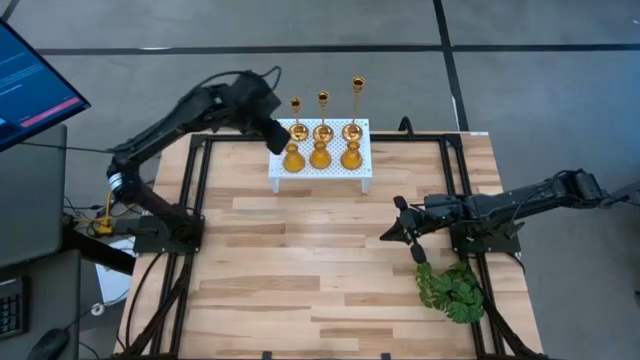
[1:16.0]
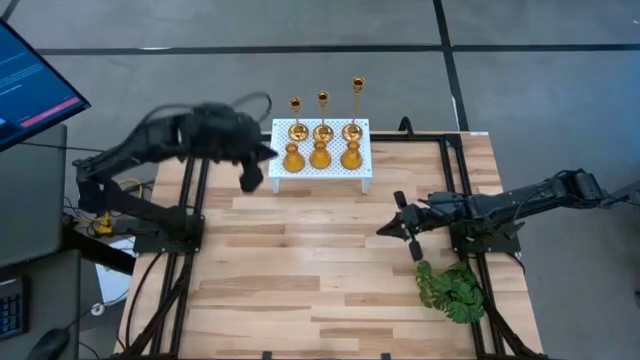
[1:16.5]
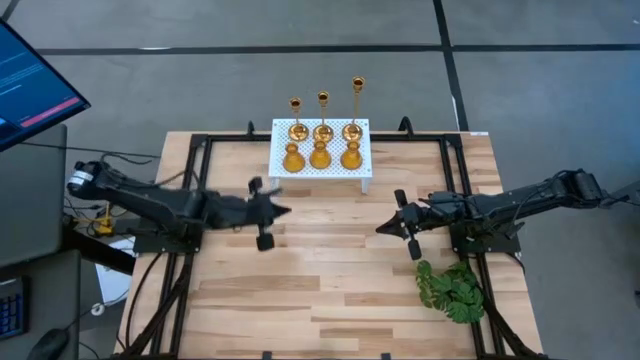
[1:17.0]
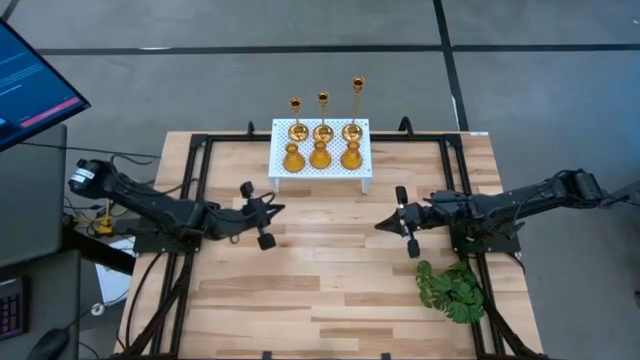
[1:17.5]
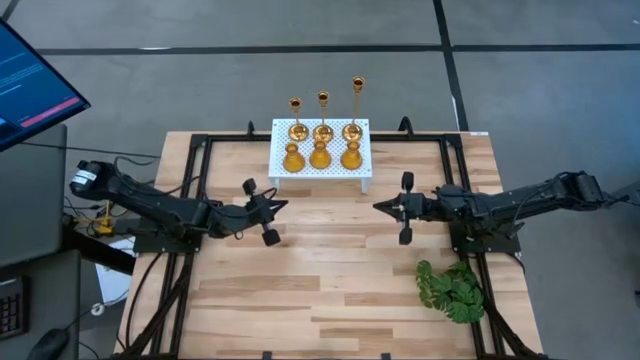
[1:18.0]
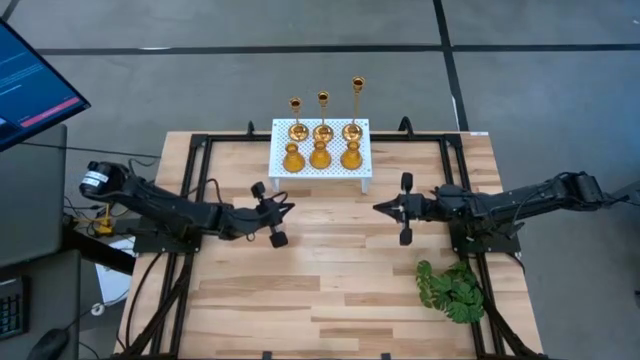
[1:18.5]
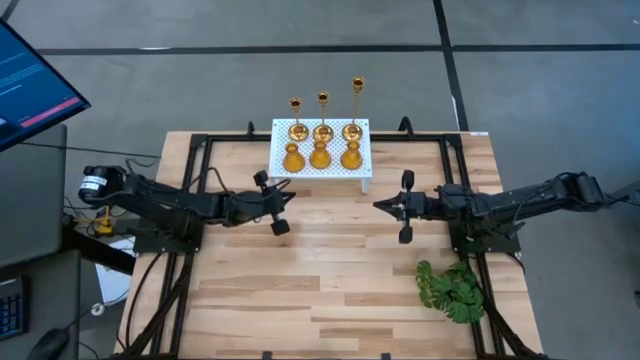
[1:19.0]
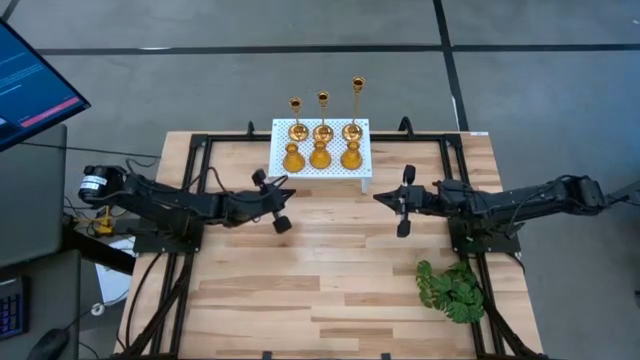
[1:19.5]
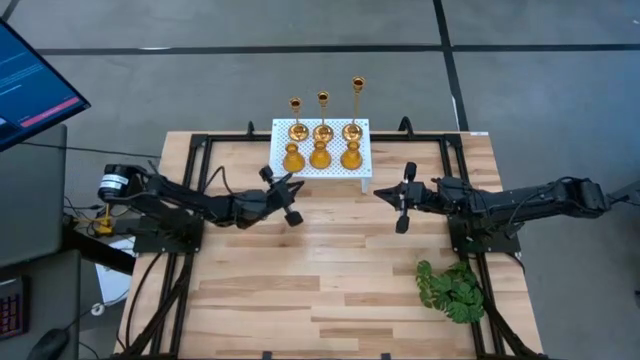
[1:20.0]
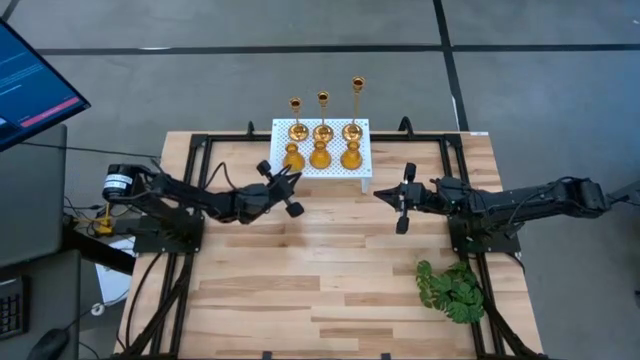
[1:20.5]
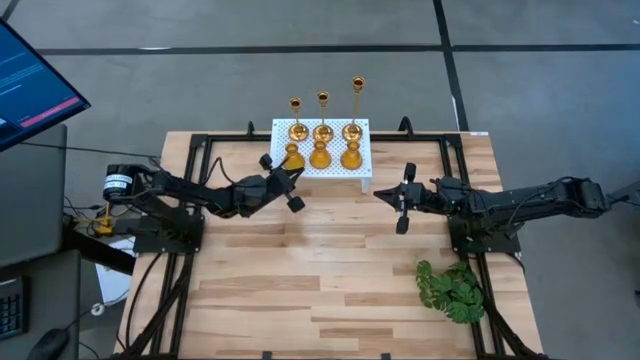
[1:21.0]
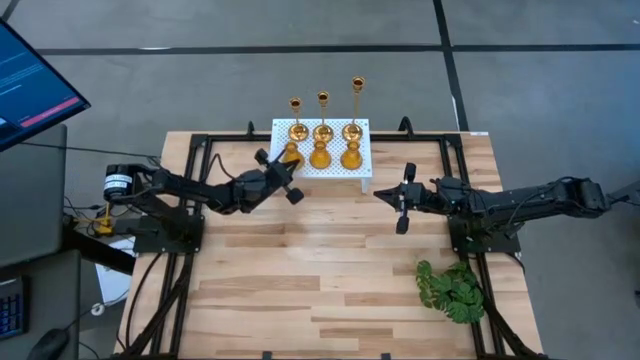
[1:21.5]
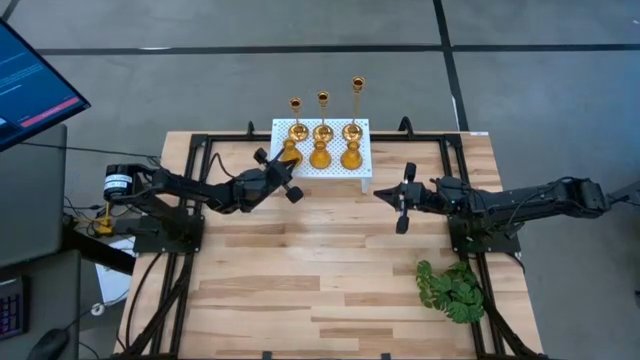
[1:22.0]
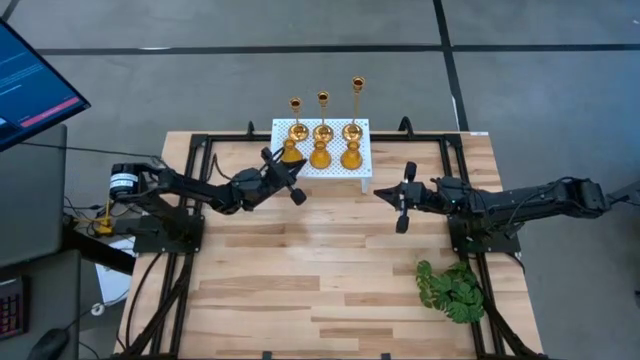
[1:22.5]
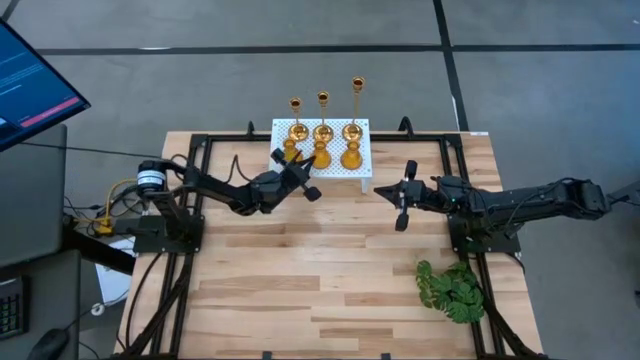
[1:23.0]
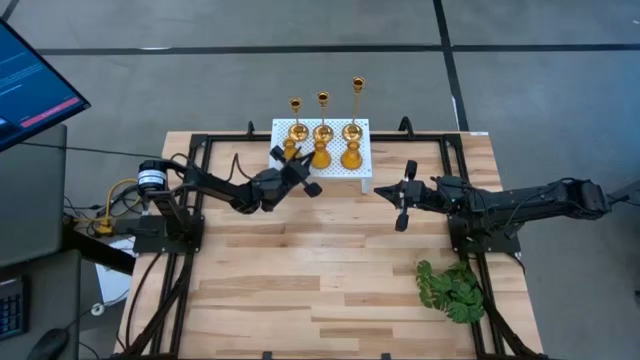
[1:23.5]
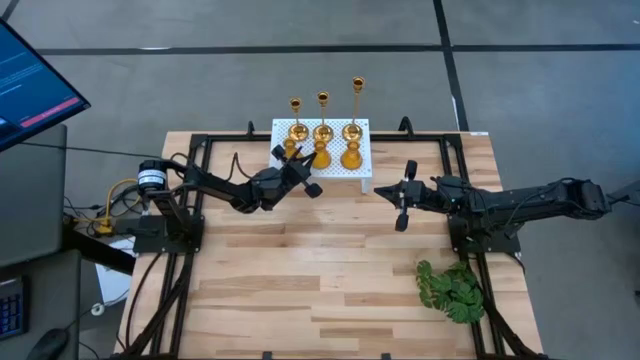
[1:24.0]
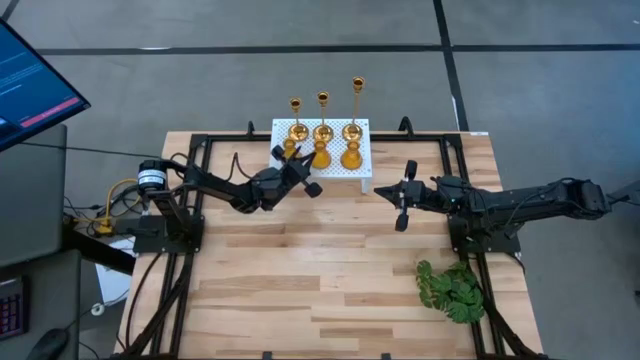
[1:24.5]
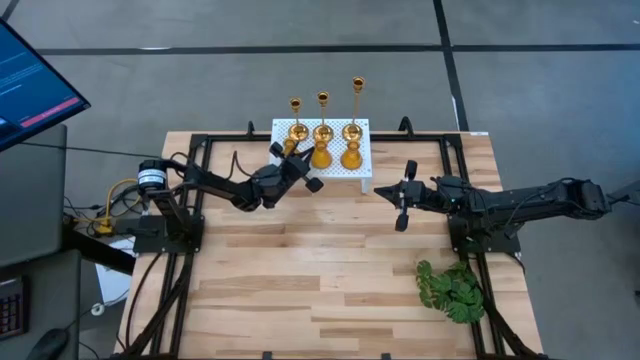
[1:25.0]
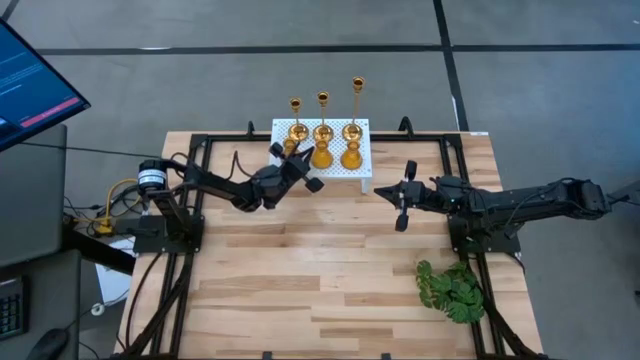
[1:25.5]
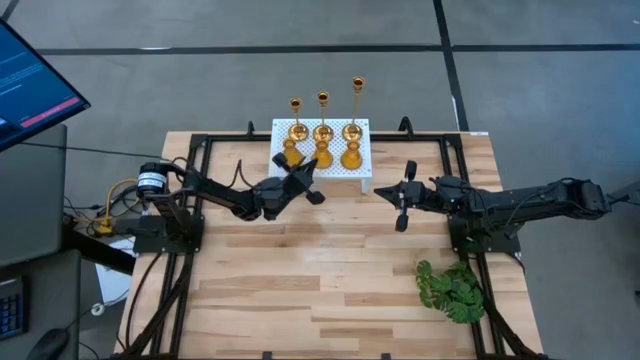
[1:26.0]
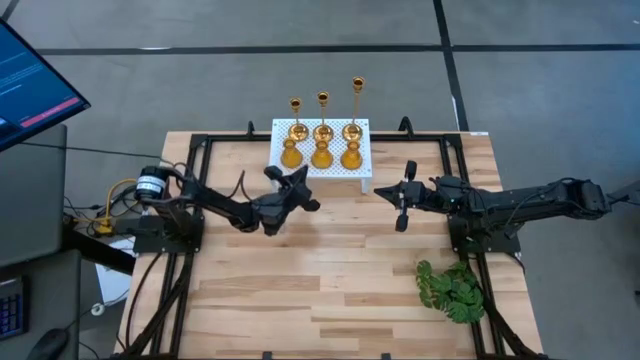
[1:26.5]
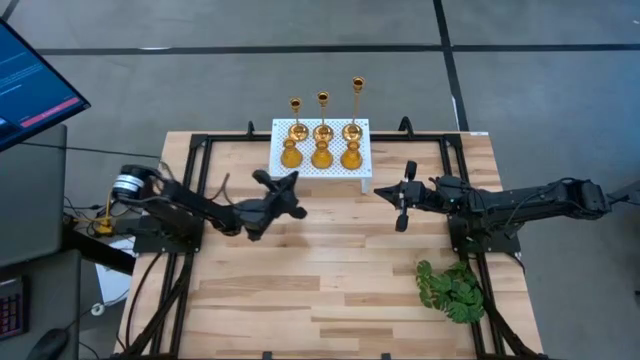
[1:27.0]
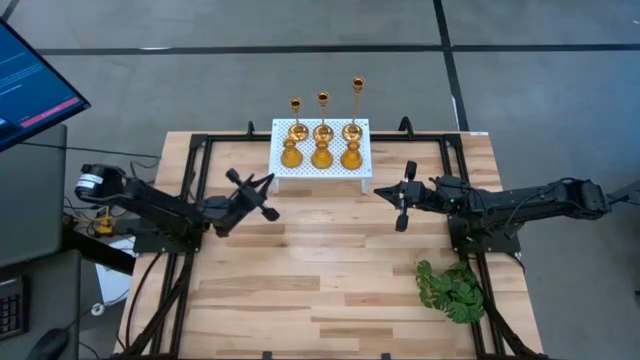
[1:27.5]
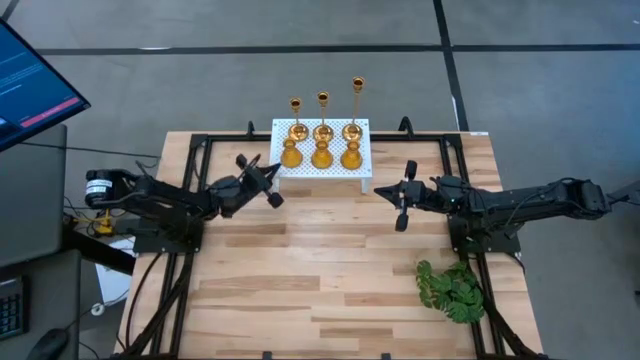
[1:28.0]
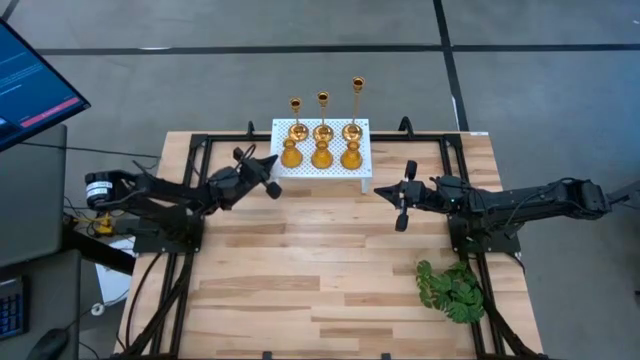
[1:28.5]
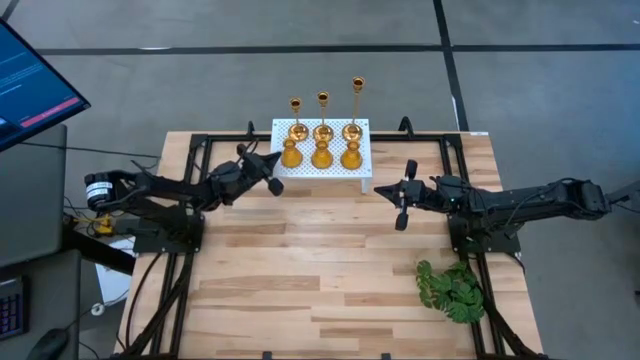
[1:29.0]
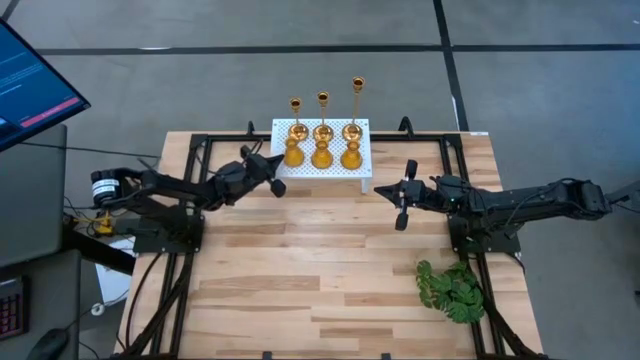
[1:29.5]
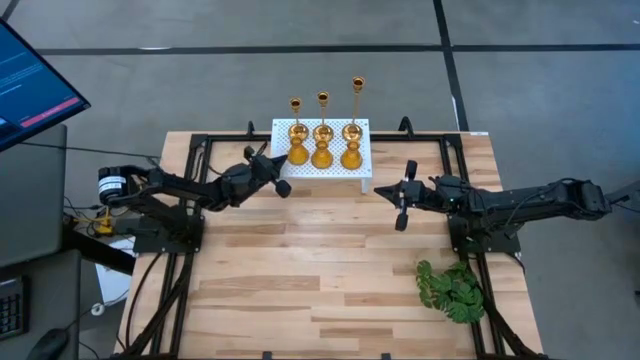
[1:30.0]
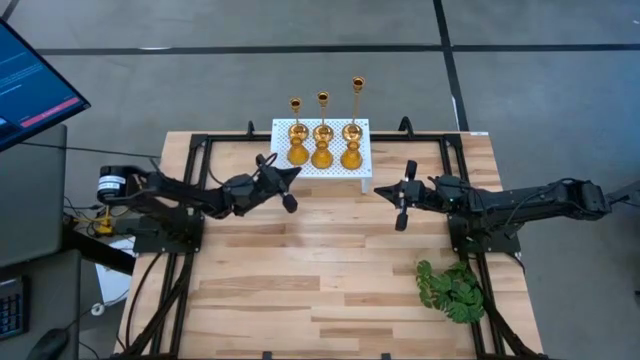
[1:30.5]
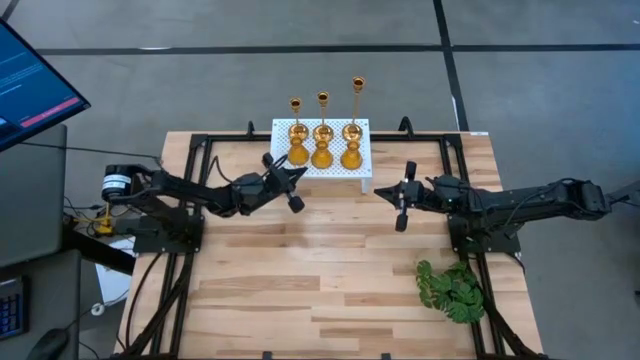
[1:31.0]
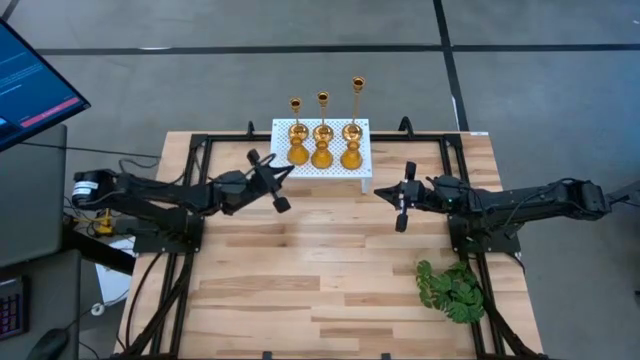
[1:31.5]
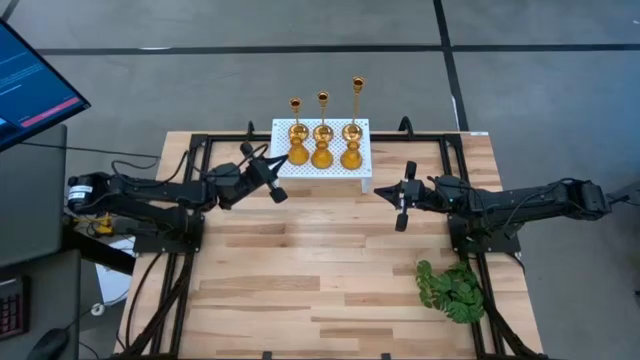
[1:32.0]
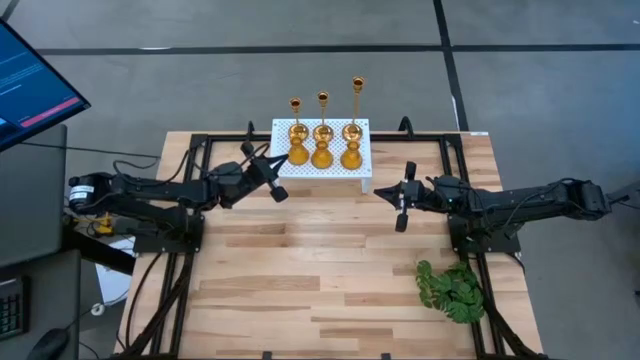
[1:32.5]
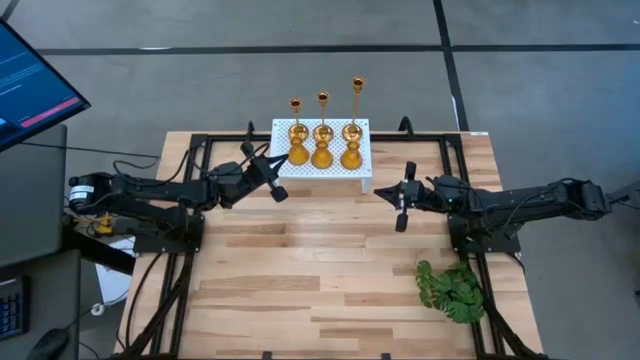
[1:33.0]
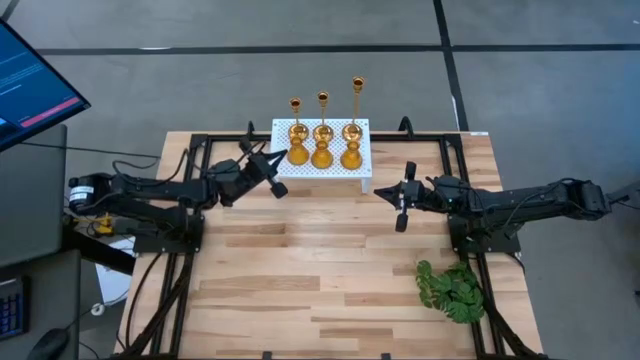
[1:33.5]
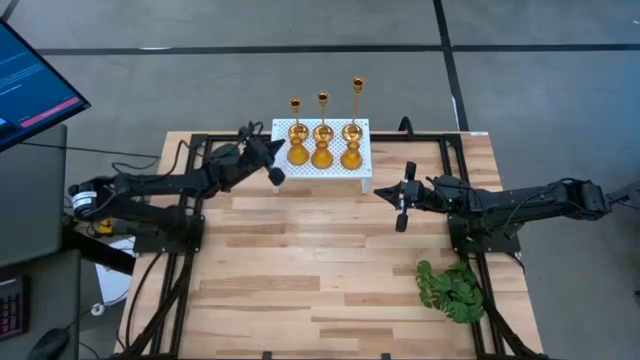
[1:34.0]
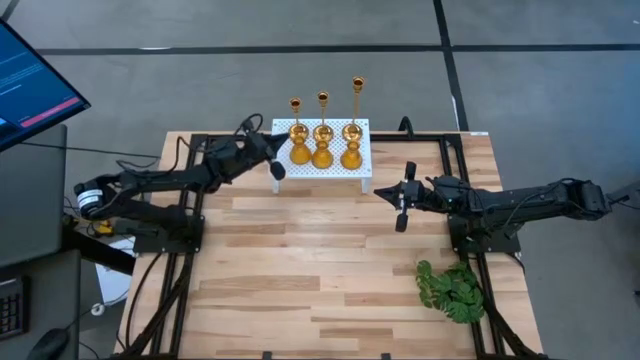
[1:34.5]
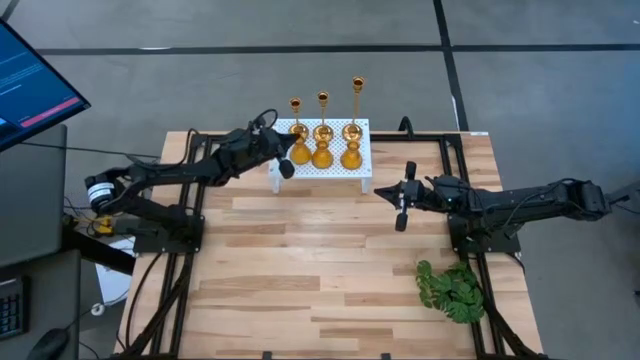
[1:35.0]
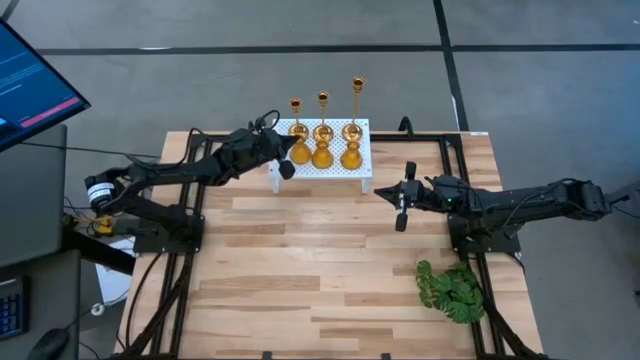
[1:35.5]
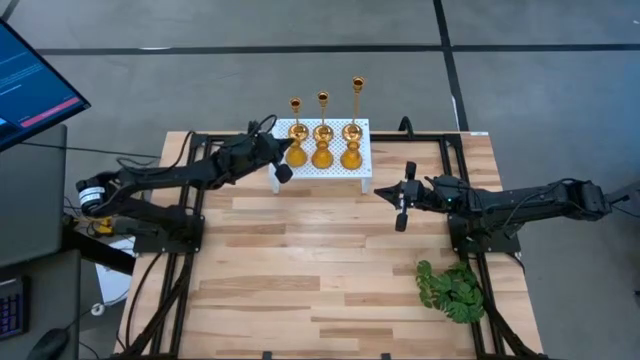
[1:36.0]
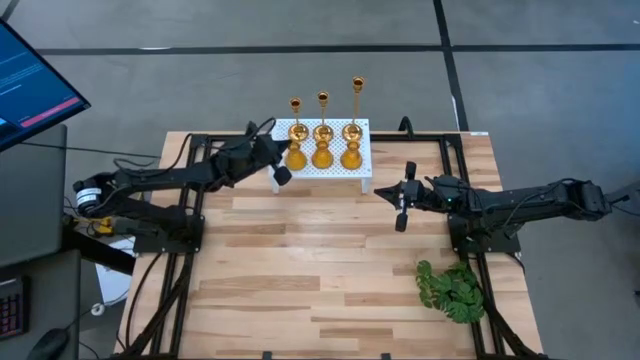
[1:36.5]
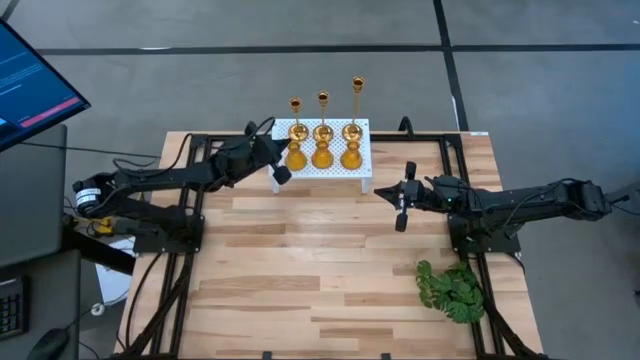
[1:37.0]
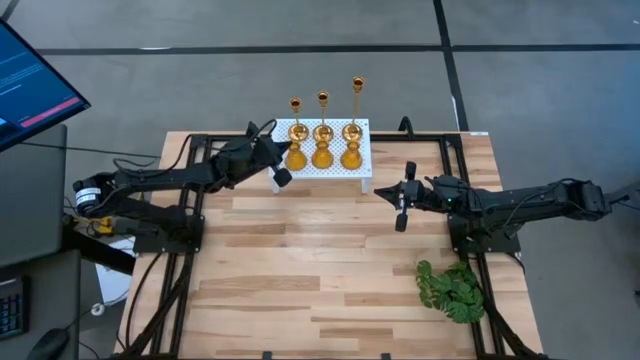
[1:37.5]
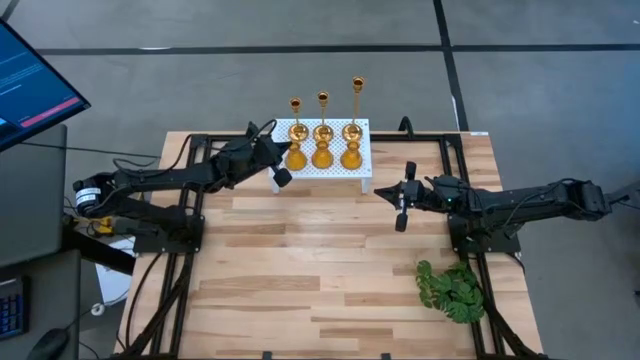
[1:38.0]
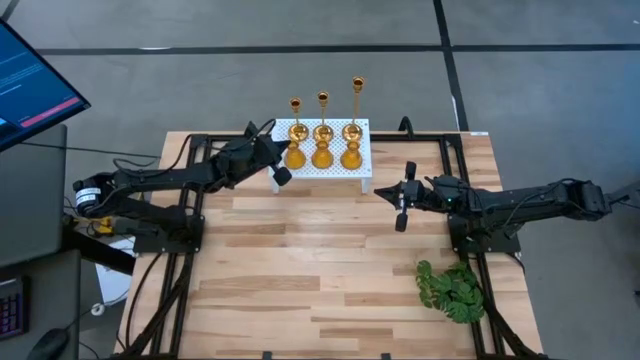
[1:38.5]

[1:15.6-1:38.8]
Task: Pick & Place candle stick holders
Adjust the orange candle holders to properly align them
